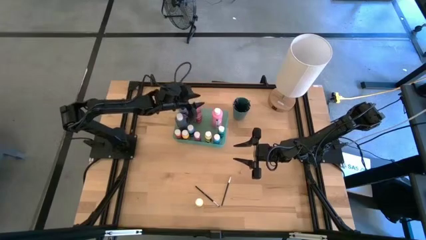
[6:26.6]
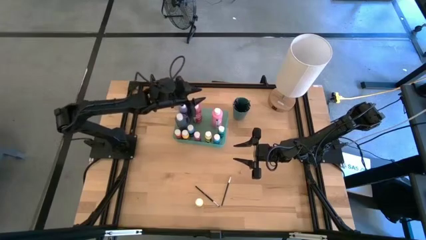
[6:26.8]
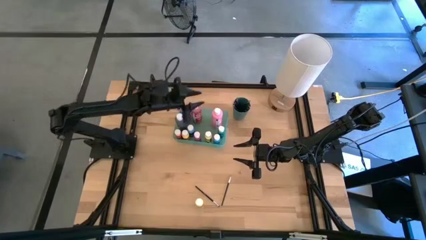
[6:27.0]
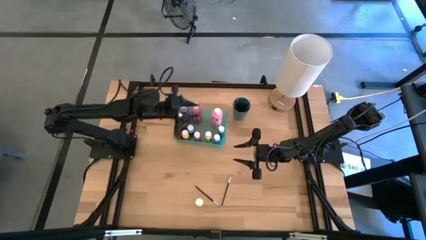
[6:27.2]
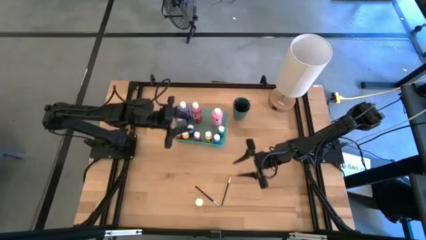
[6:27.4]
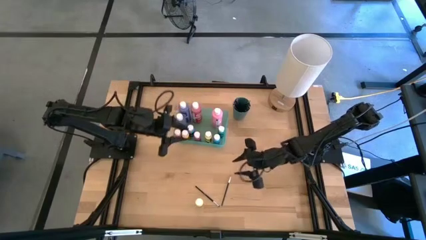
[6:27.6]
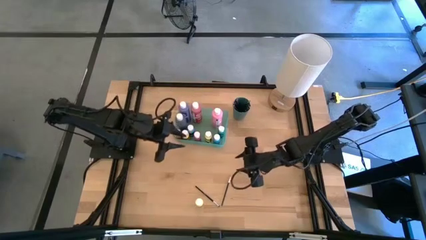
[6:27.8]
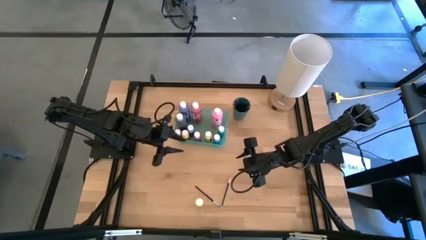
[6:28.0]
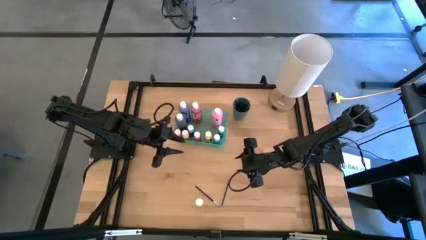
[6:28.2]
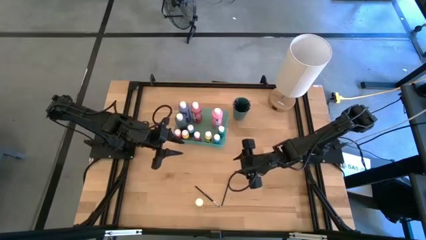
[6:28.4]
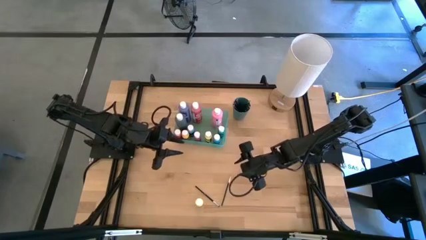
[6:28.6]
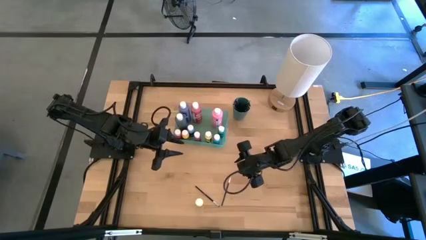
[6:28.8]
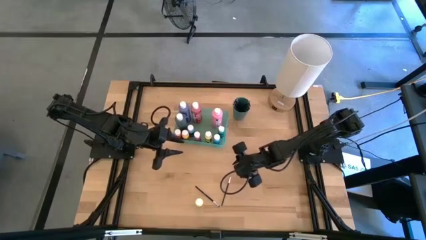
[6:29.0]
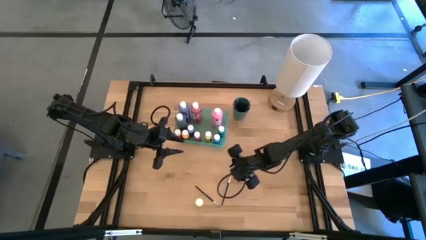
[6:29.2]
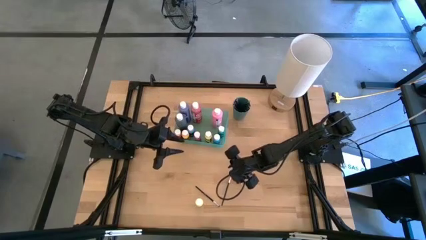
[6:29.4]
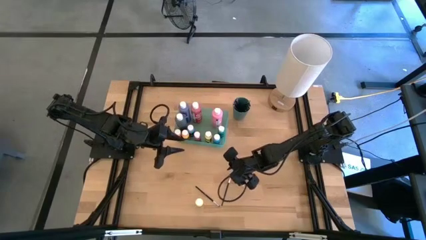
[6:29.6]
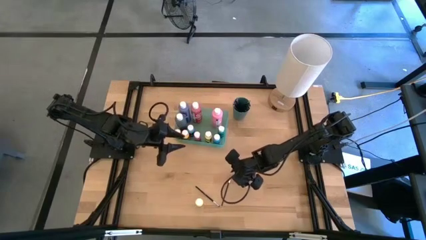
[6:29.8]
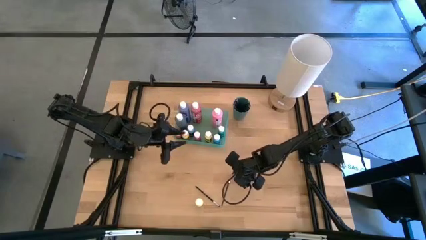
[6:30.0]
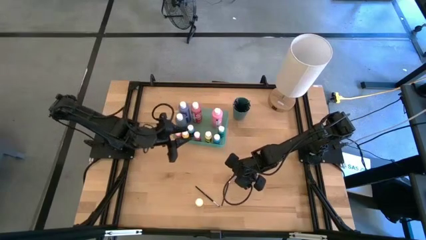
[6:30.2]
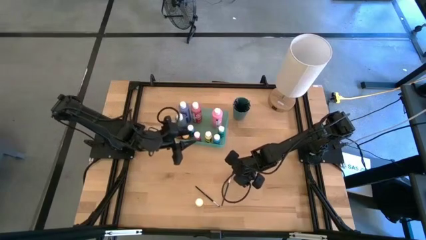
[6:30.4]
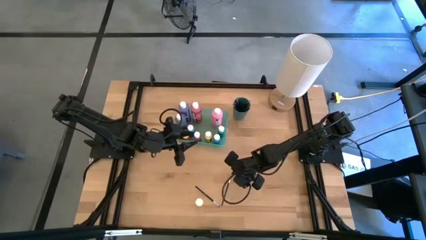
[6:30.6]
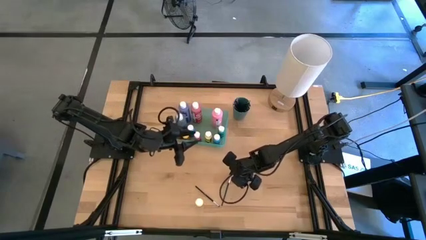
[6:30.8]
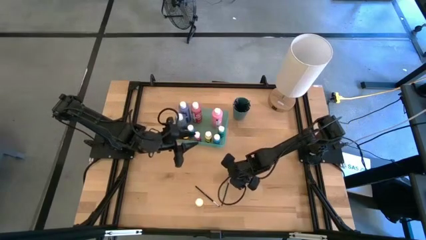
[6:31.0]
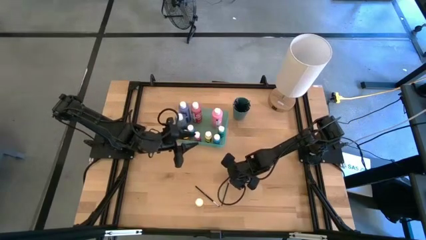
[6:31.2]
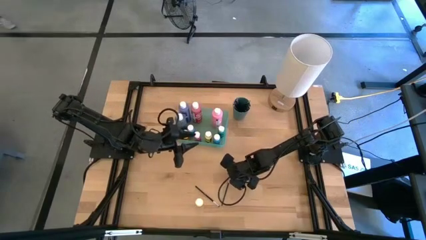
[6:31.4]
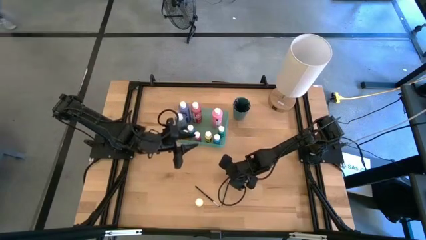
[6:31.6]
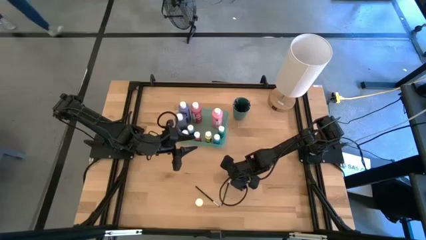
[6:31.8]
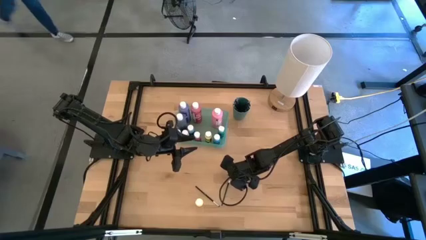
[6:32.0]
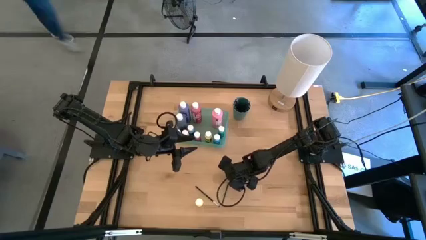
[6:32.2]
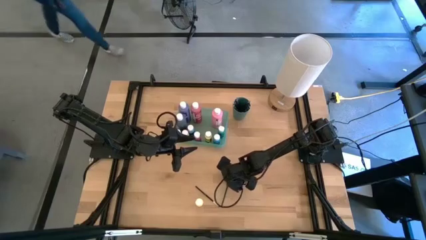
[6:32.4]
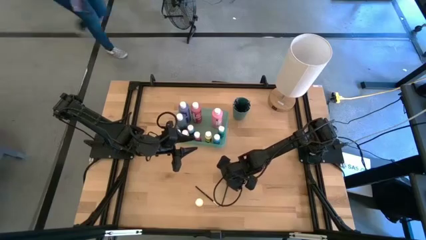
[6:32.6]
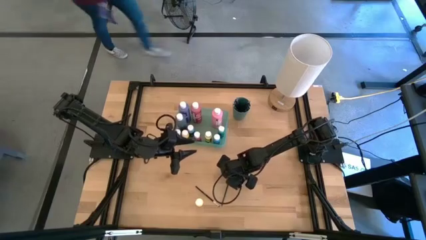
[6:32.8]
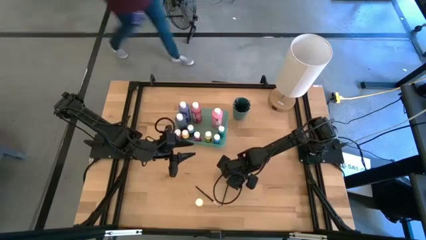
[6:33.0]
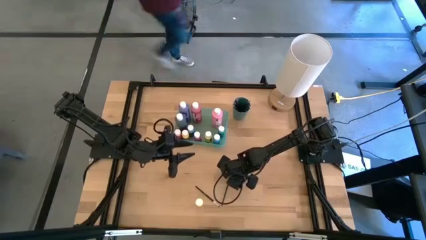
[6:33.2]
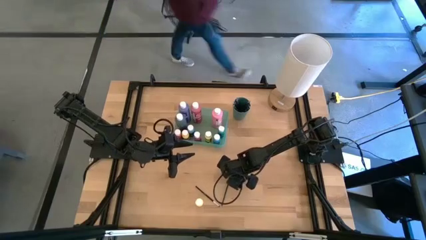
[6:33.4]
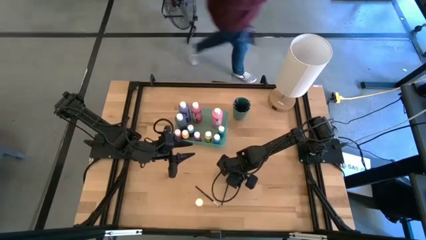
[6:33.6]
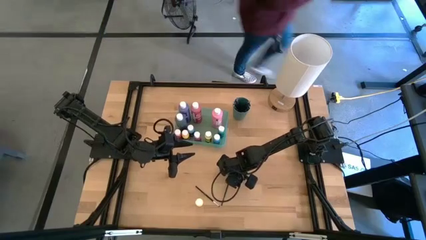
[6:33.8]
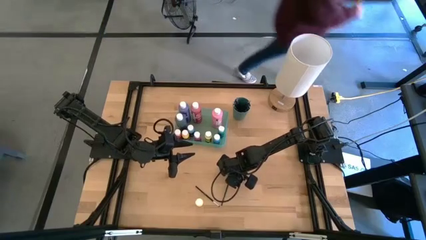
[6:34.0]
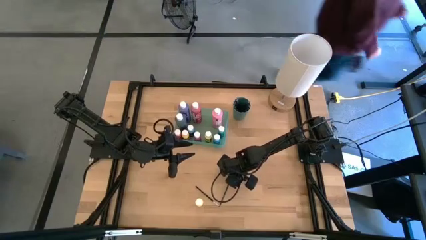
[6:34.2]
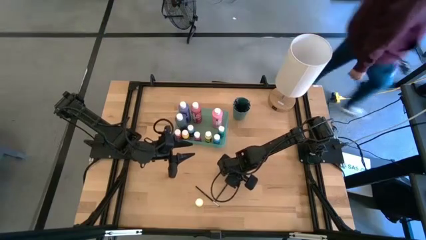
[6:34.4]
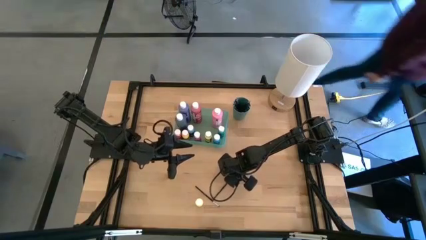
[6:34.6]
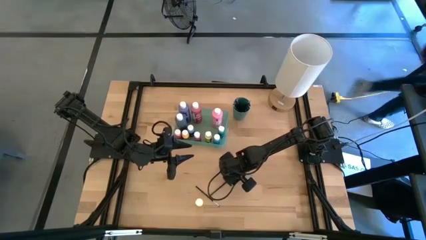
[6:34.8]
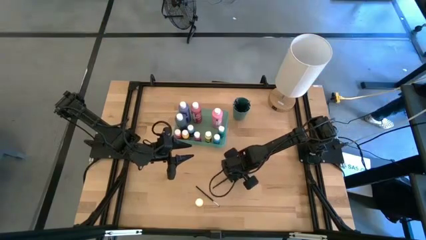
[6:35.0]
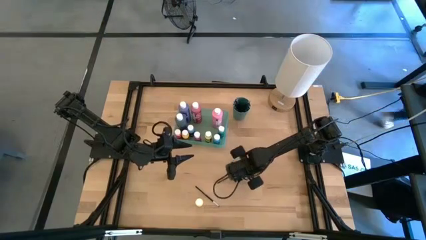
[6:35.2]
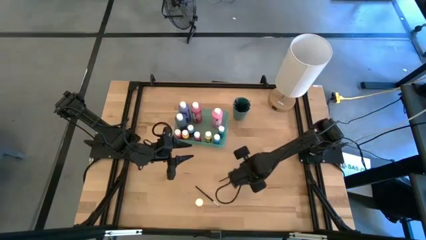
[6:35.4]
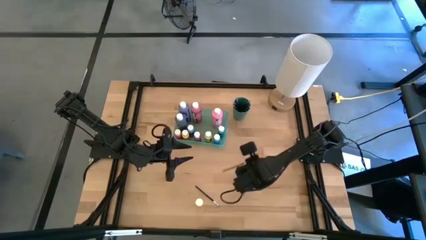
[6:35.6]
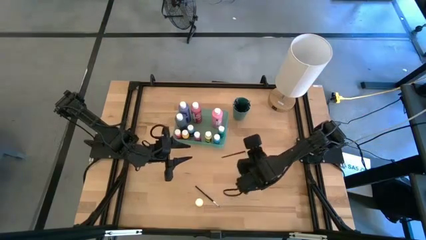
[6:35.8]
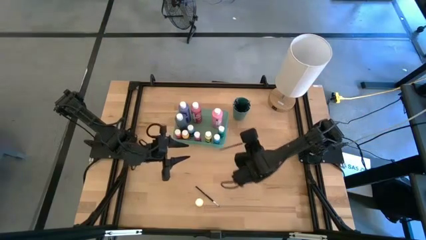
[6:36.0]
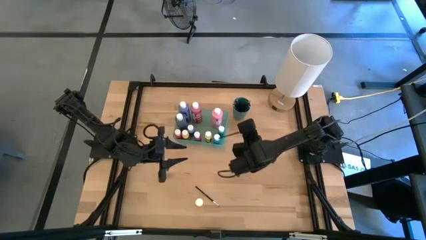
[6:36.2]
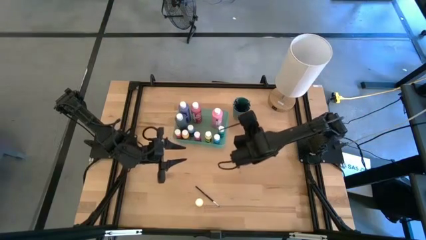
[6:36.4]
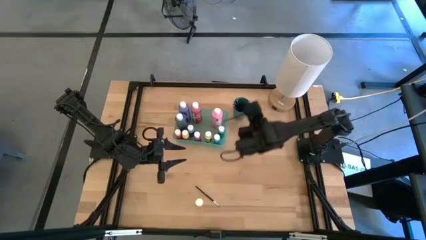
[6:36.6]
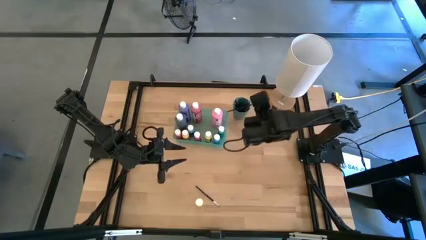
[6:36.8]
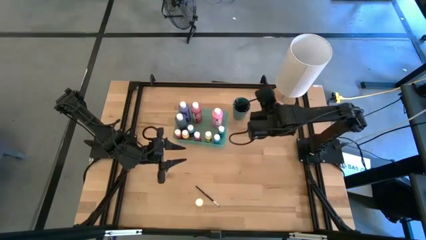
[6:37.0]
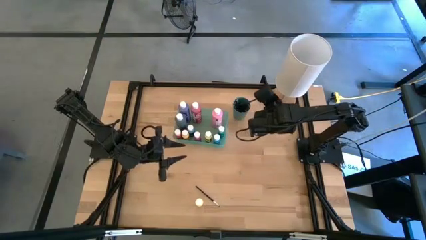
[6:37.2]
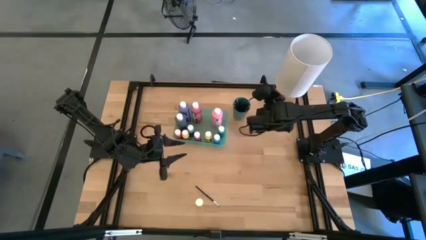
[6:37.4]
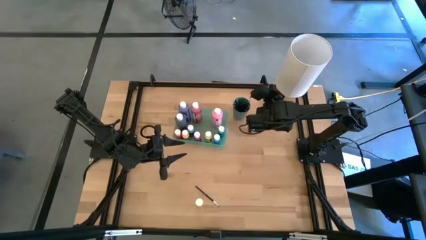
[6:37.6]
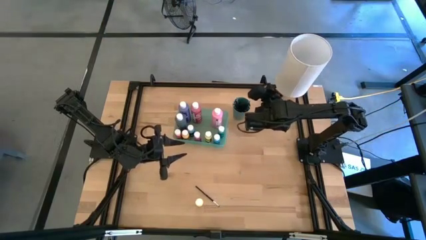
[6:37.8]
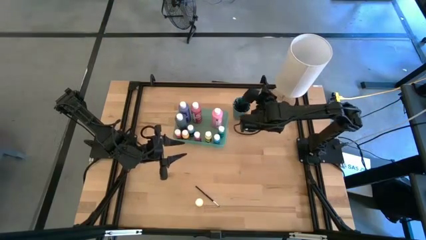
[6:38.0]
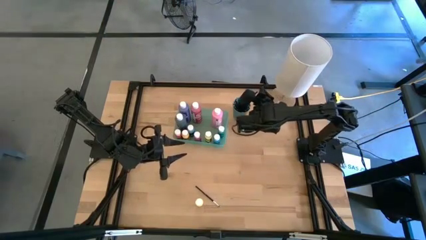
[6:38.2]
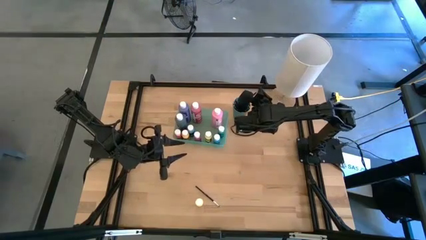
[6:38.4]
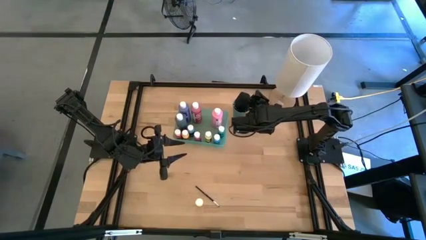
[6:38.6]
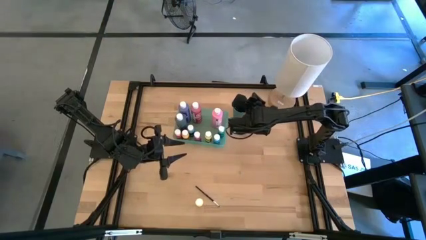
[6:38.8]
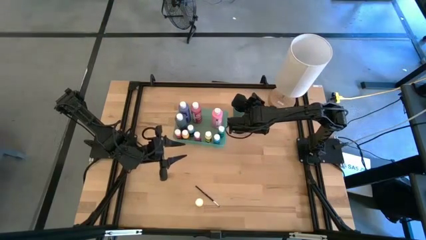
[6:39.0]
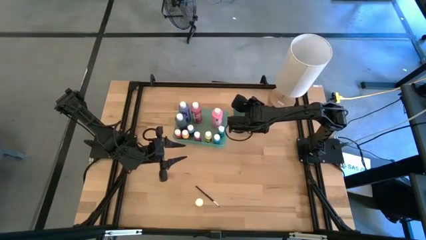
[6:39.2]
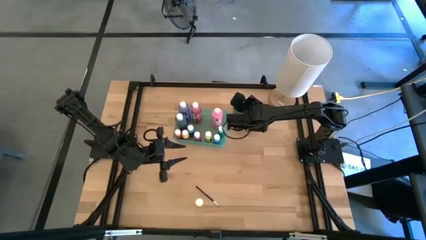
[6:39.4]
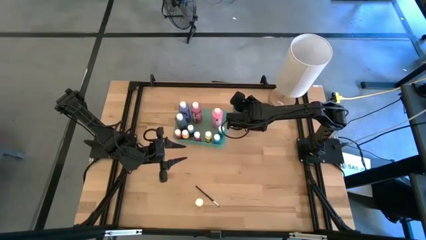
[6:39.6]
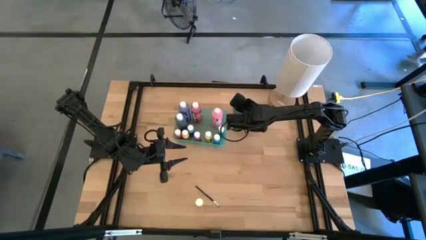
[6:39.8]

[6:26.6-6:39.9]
Task: Pick & Place Paint Supplies
Put the black paint brush into the dark green cup
